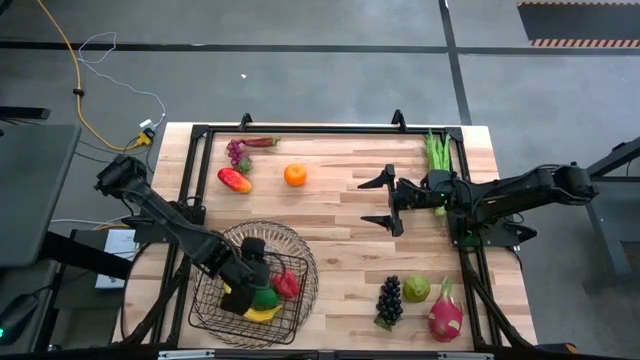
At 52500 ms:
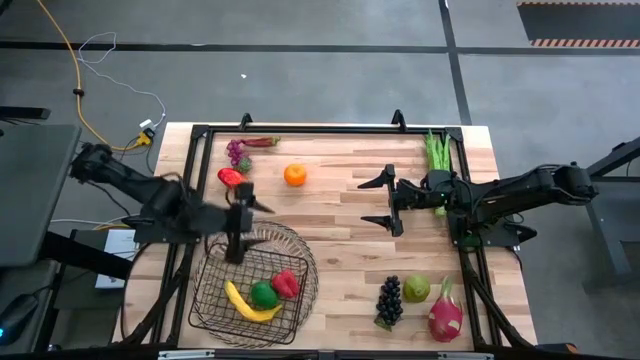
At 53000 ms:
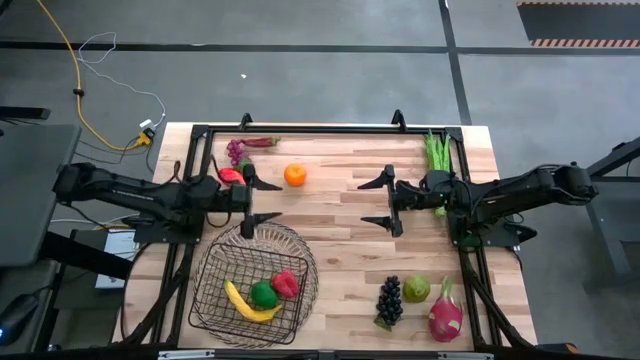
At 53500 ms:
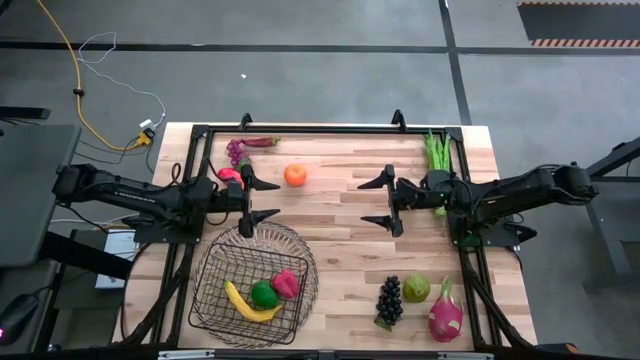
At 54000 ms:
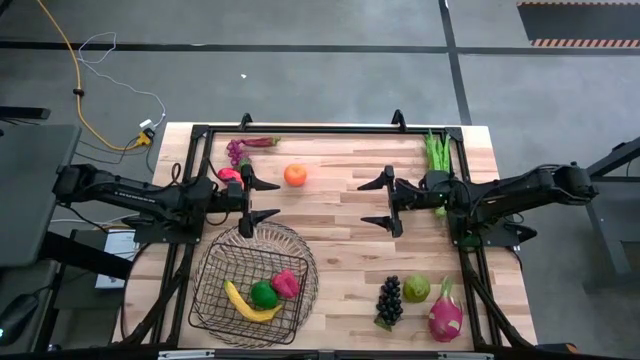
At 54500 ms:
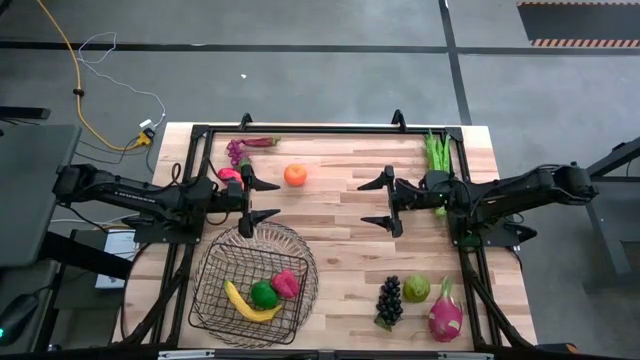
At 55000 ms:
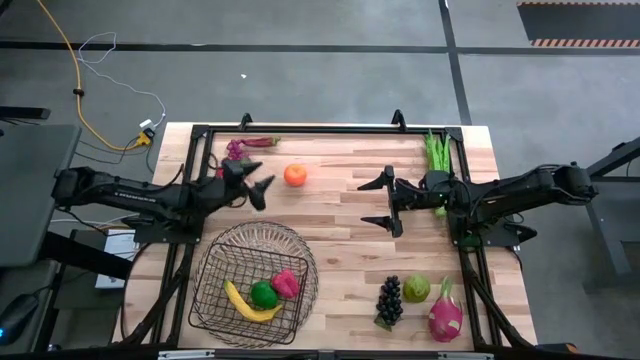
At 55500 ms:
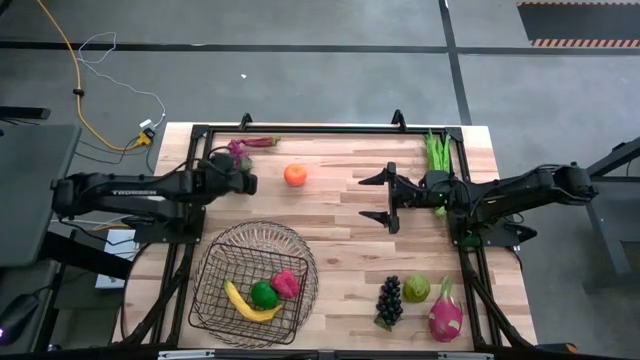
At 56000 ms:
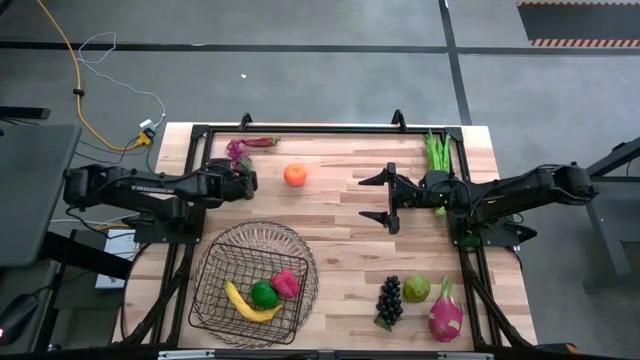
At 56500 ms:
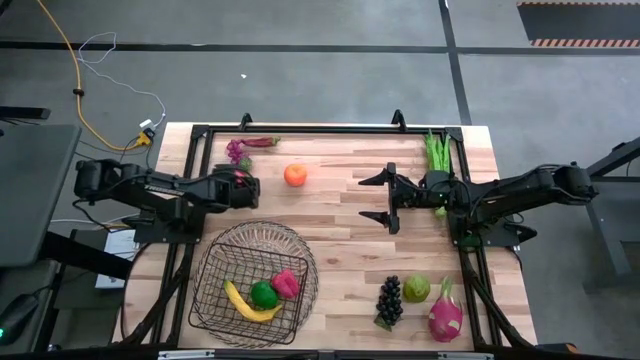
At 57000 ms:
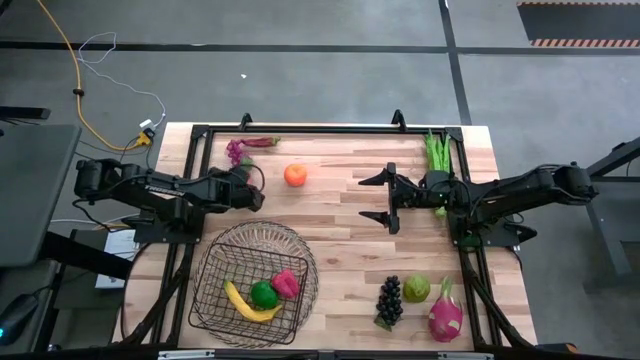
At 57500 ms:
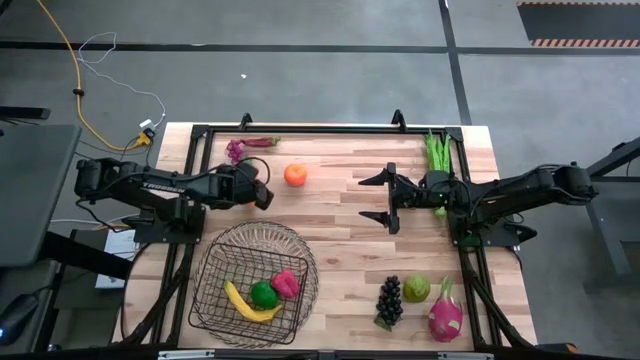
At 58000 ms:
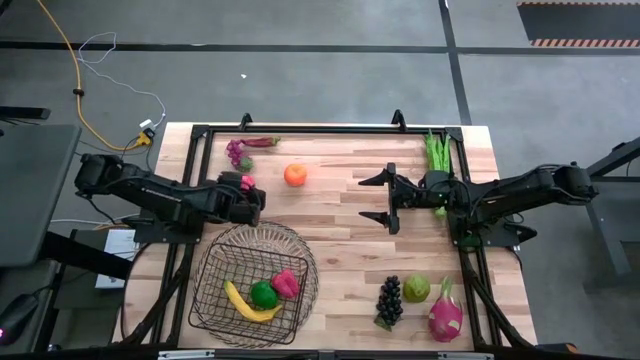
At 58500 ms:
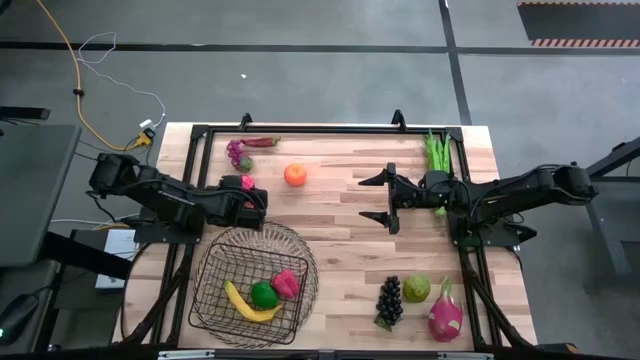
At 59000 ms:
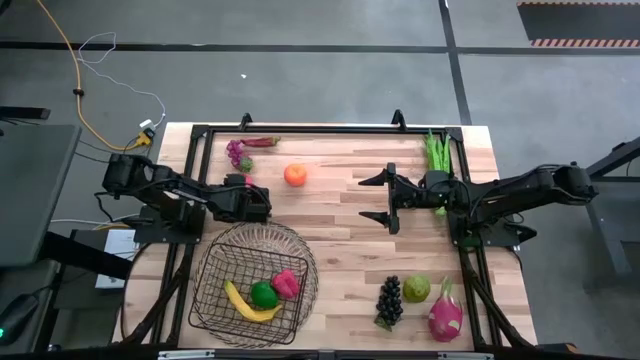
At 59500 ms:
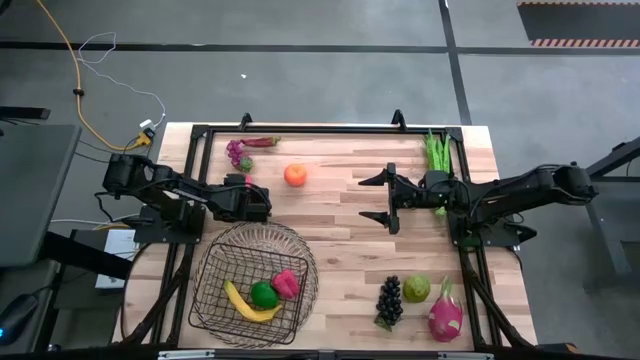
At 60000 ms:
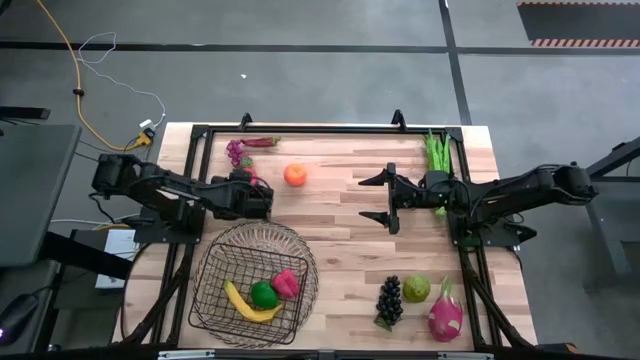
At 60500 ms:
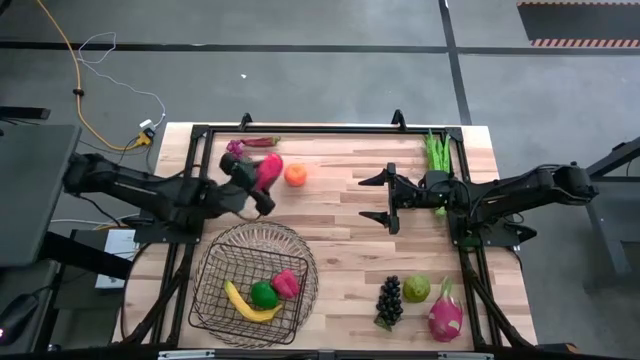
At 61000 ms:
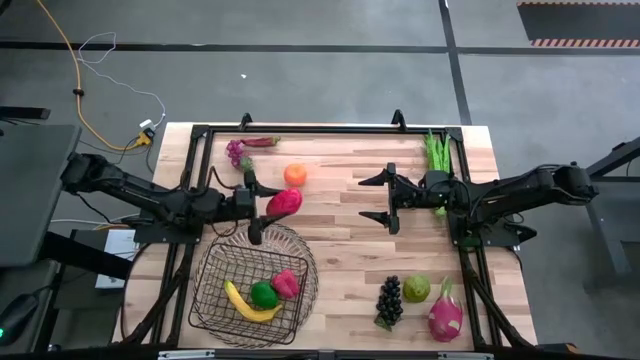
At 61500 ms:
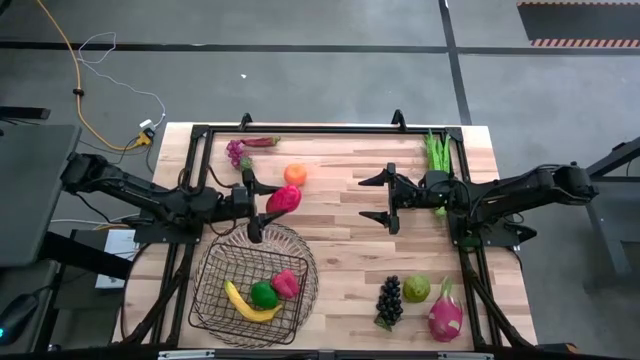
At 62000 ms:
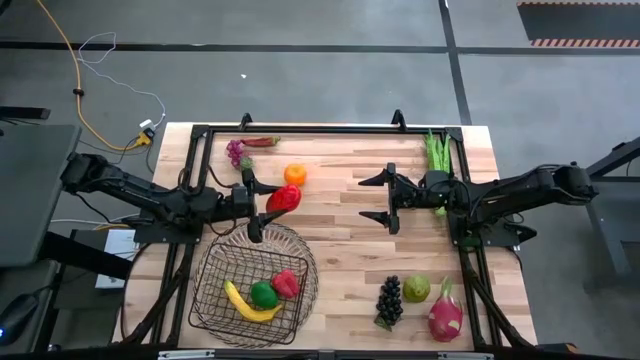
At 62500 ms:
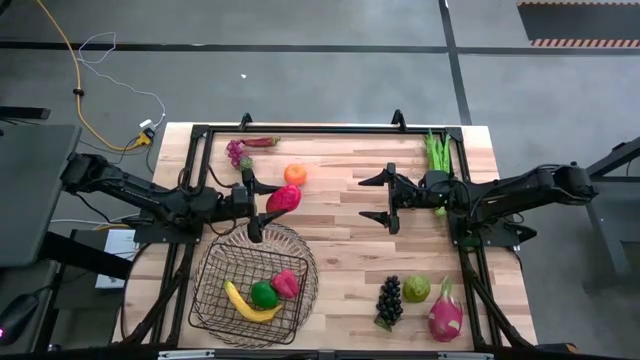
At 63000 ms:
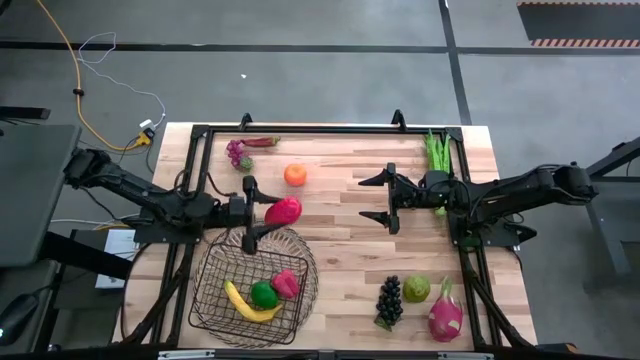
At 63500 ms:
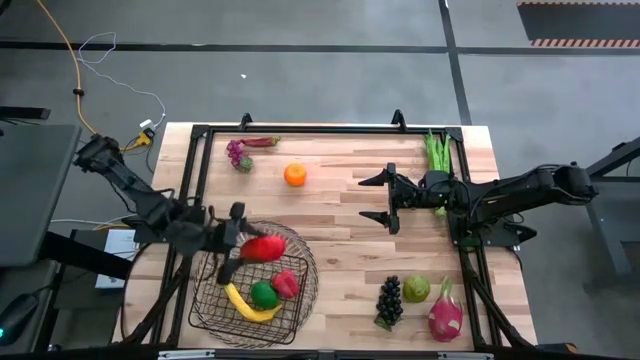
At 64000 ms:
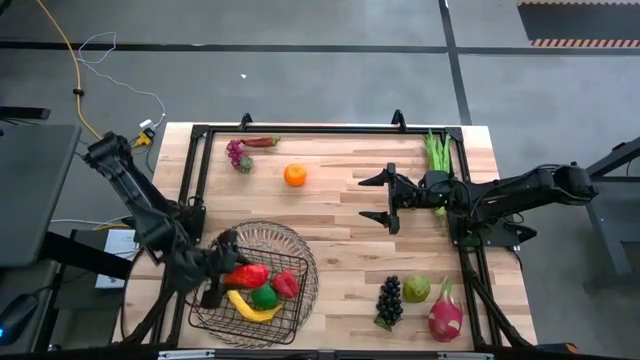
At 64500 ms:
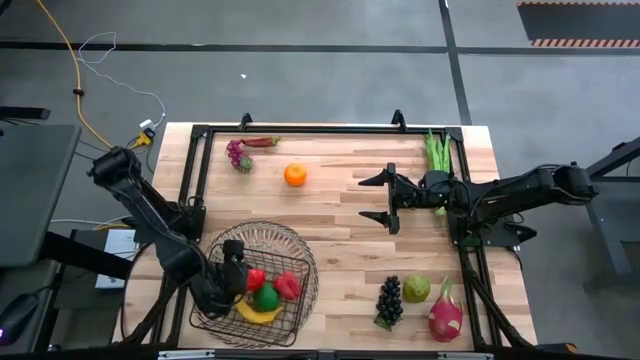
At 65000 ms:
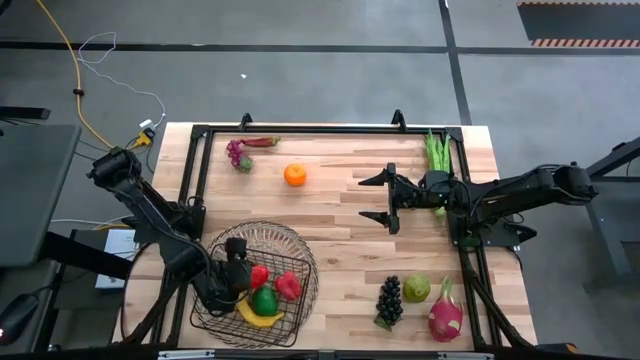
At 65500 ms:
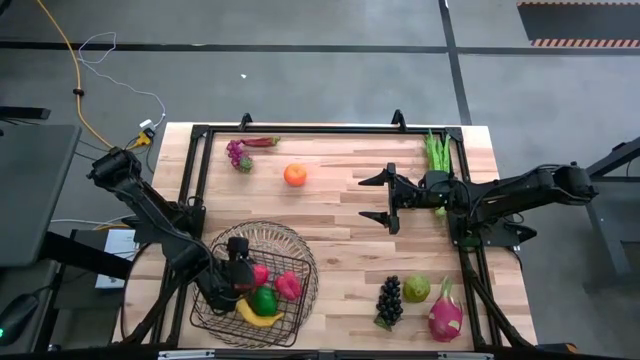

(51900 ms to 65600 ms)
Task: Build produce basket
Put the orange mango into the black wire basket

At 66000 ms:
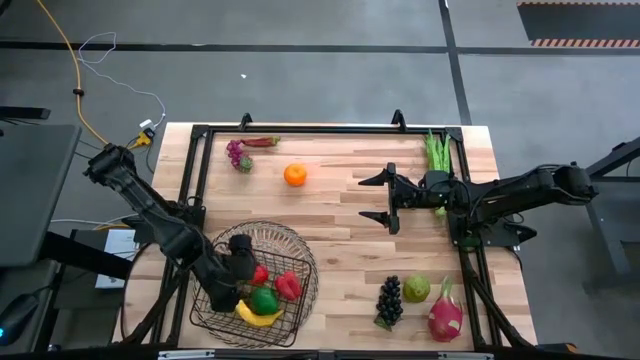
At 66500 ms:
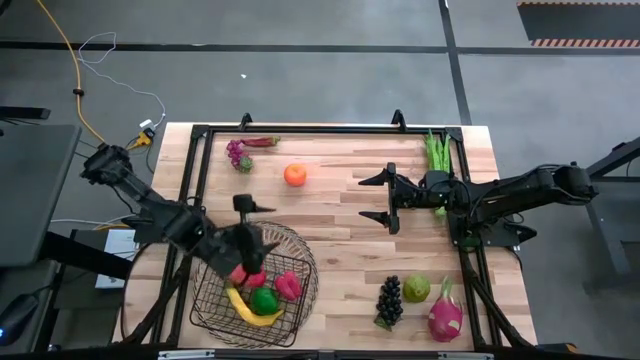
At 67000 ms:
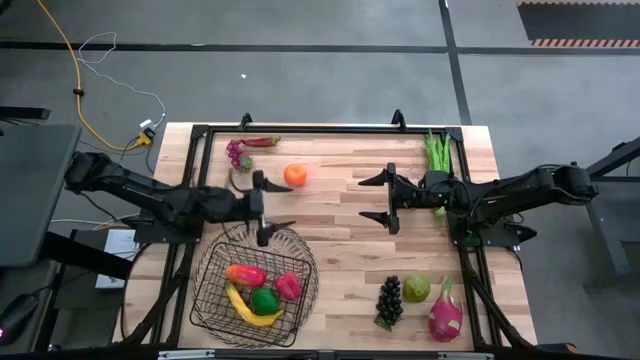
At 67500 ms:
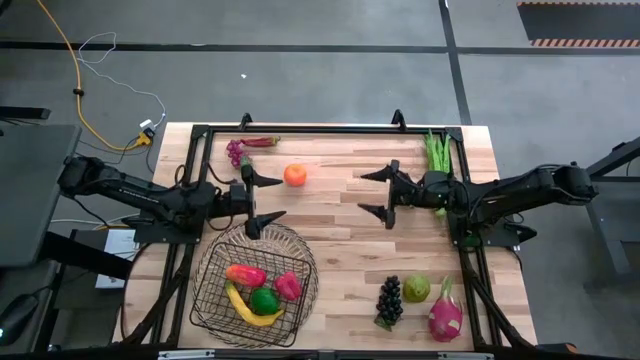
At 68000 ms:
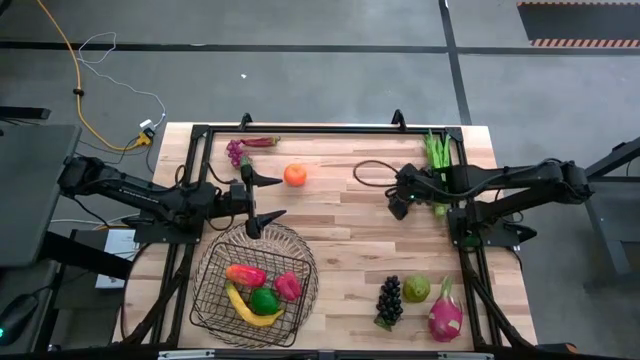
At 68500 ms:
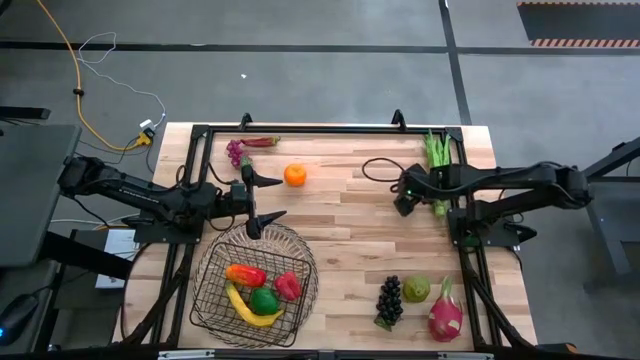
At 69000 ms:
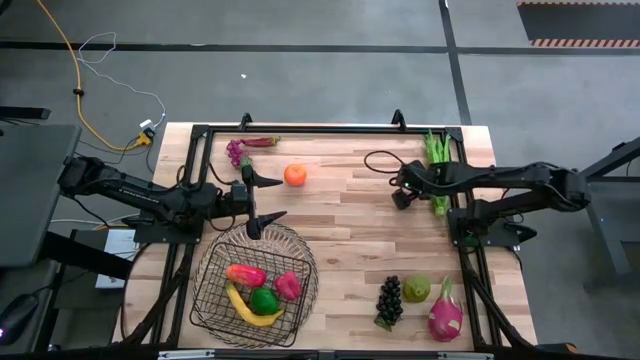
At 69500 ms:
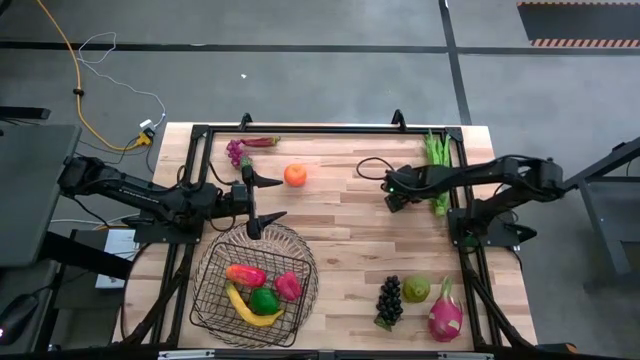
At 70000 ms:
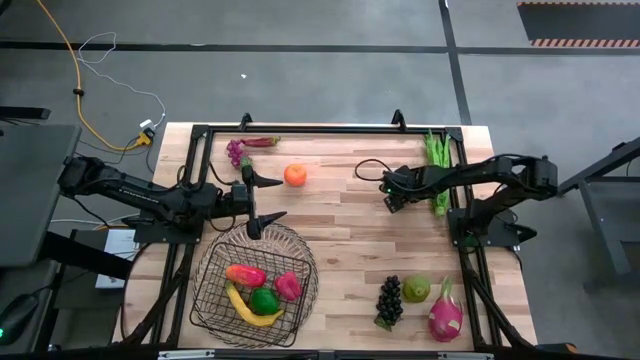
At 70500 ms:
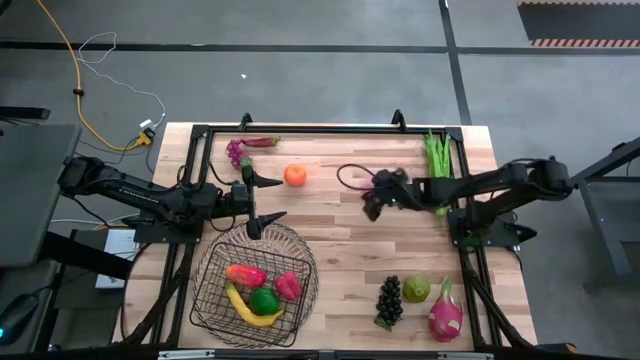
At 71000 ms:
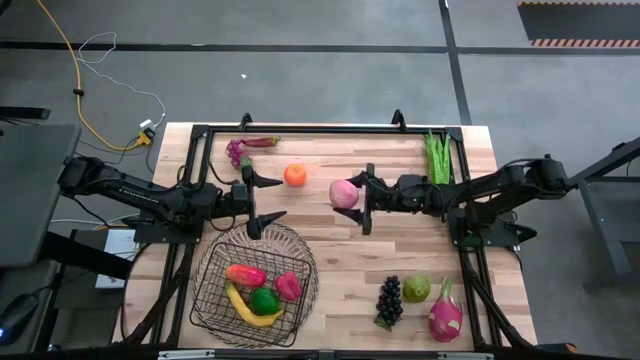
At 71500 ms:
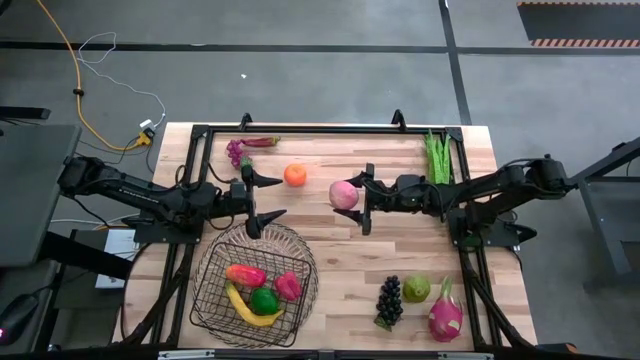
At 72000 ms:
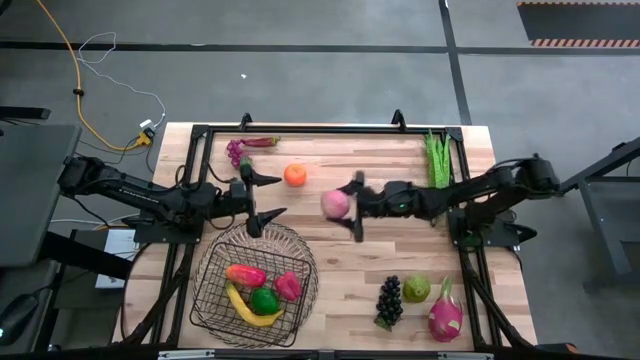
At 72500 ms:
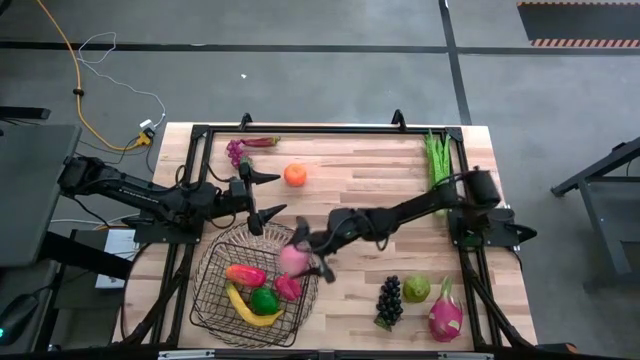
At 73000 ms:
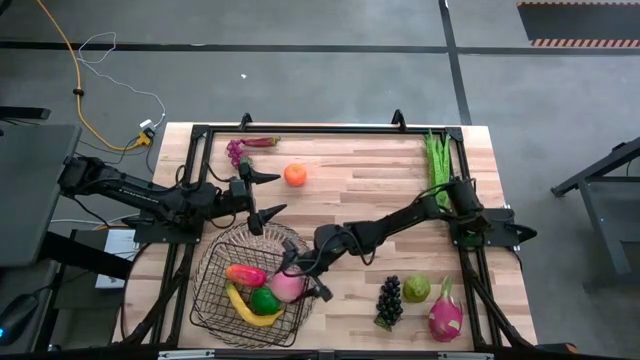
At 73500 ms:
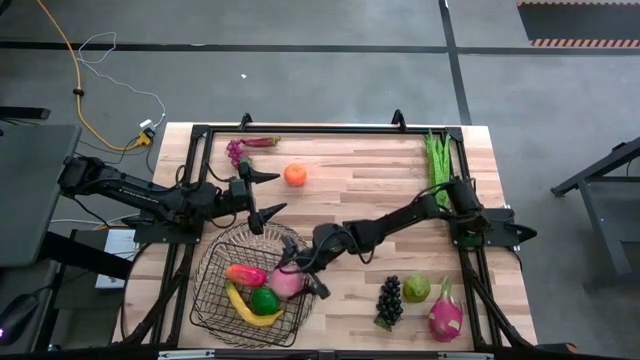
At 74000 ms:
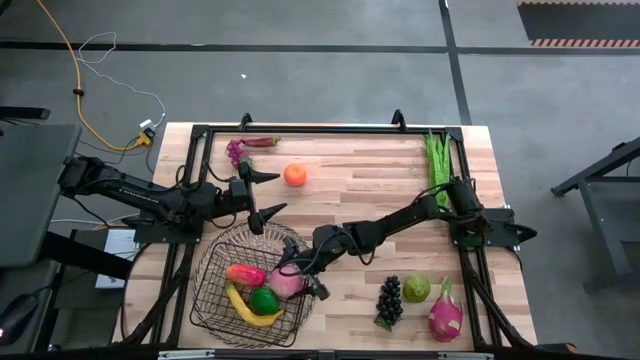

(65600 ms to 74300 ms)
Put the pink peach into the black wire basket
